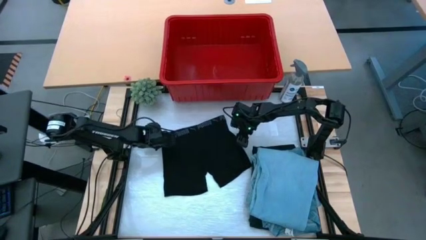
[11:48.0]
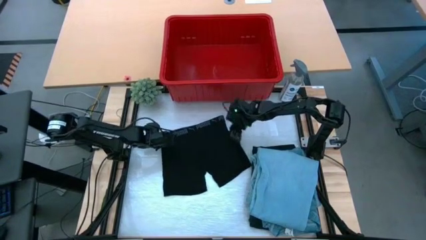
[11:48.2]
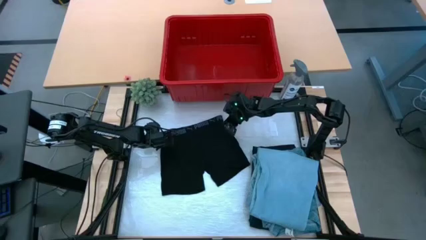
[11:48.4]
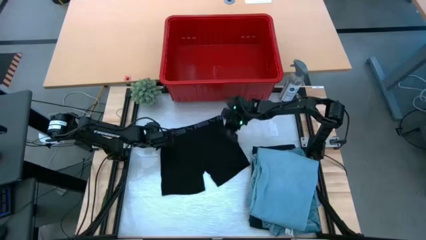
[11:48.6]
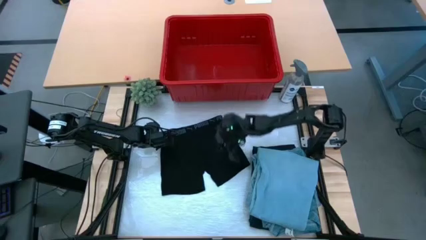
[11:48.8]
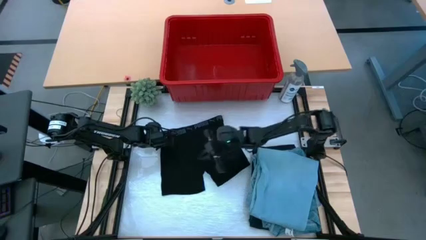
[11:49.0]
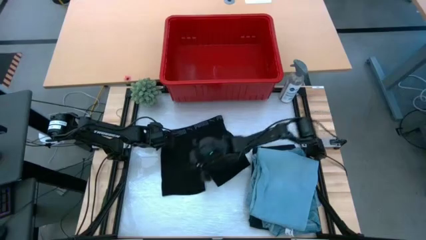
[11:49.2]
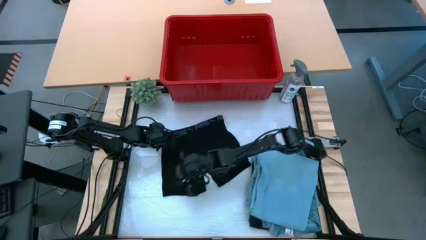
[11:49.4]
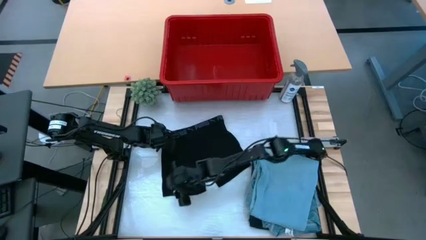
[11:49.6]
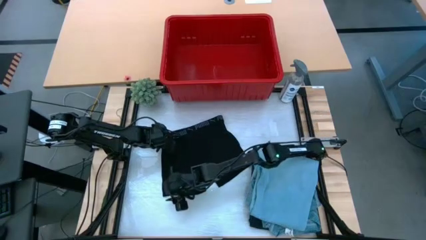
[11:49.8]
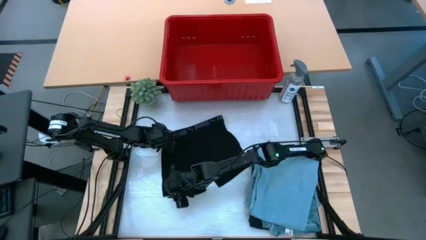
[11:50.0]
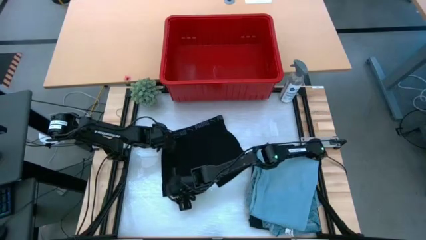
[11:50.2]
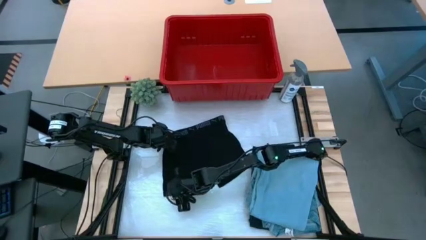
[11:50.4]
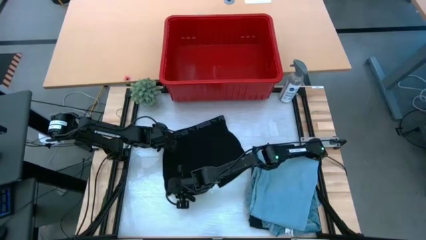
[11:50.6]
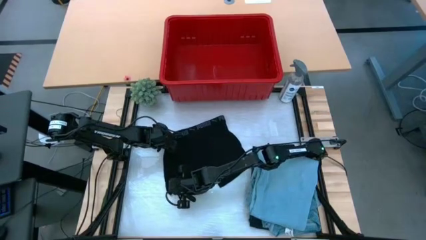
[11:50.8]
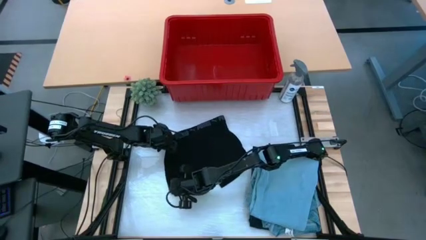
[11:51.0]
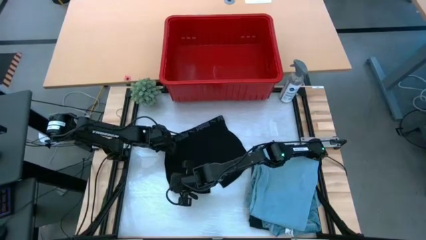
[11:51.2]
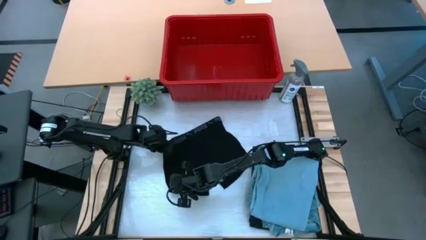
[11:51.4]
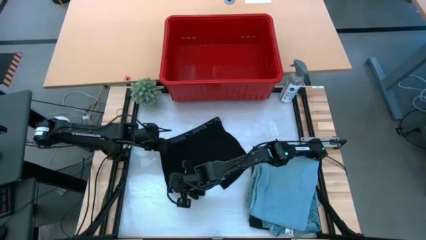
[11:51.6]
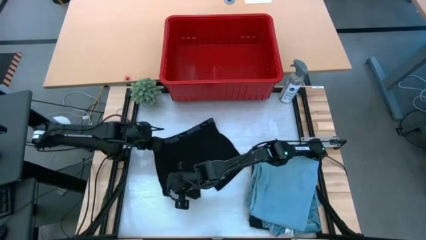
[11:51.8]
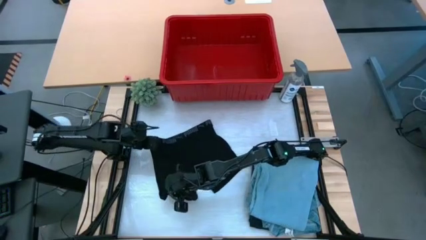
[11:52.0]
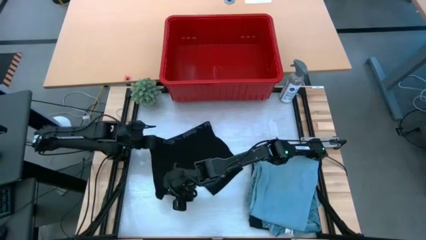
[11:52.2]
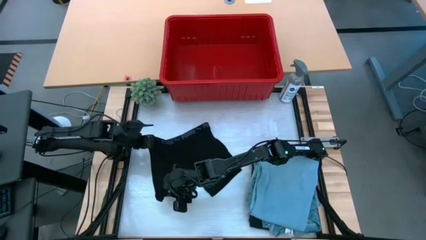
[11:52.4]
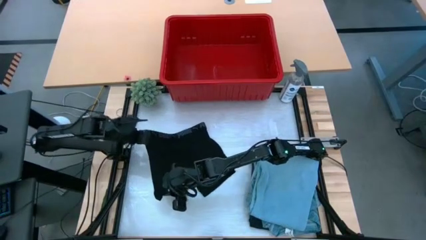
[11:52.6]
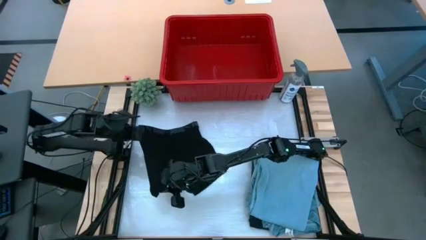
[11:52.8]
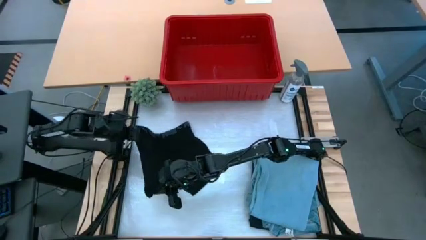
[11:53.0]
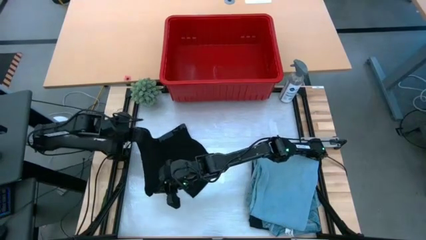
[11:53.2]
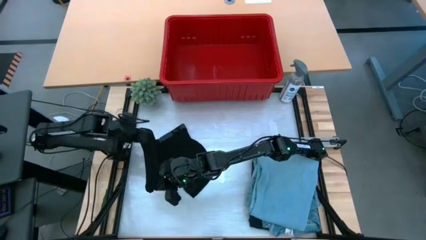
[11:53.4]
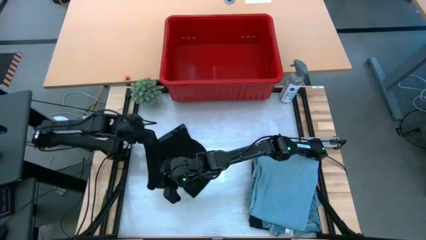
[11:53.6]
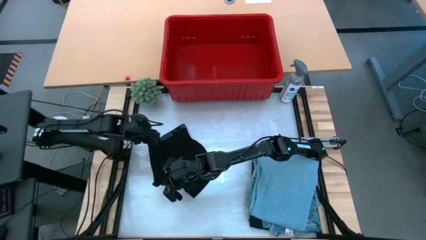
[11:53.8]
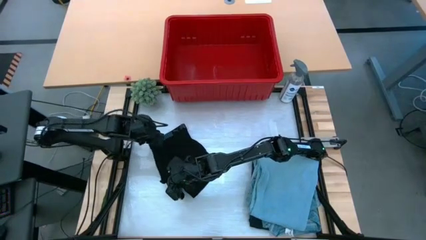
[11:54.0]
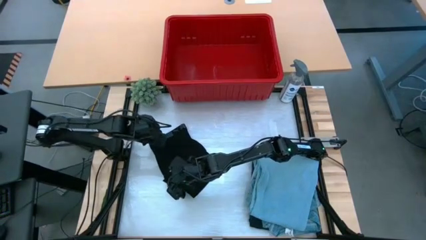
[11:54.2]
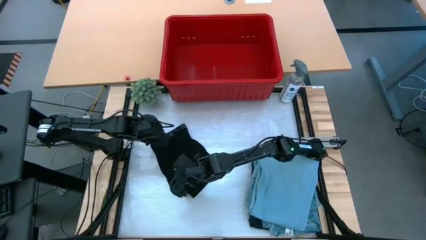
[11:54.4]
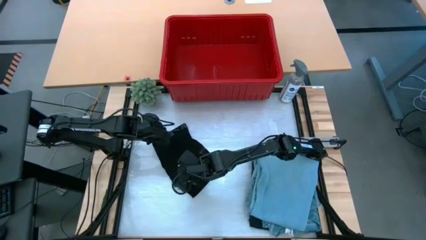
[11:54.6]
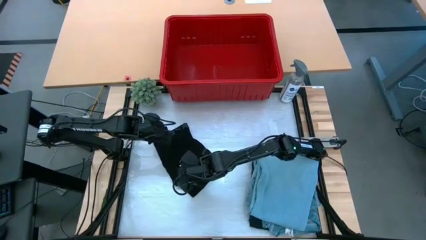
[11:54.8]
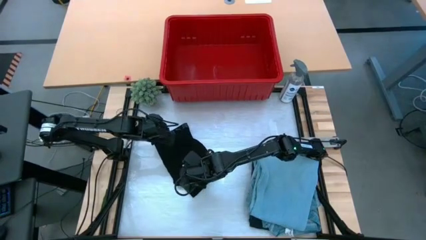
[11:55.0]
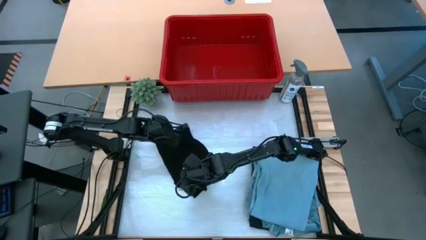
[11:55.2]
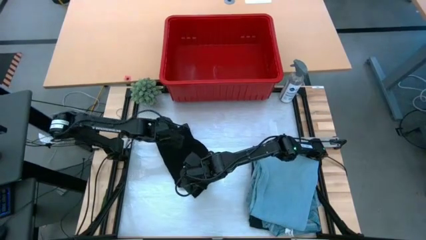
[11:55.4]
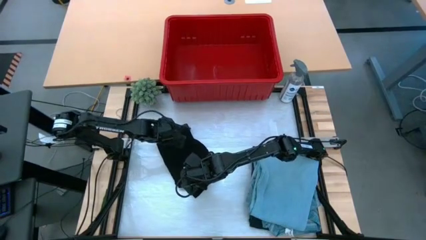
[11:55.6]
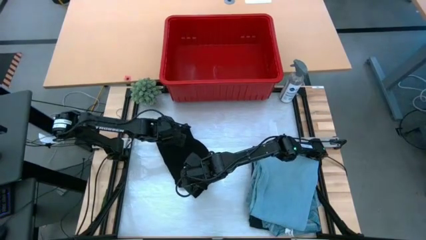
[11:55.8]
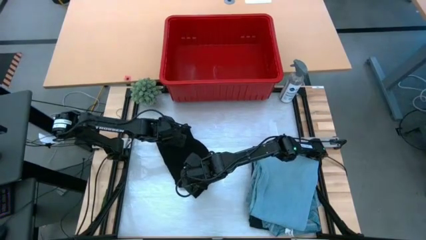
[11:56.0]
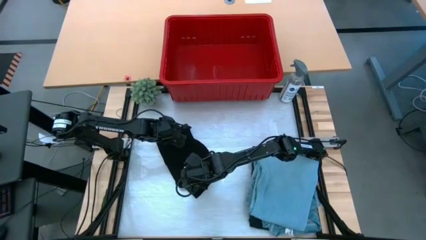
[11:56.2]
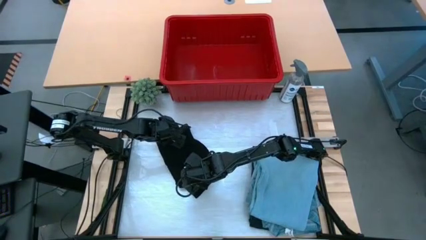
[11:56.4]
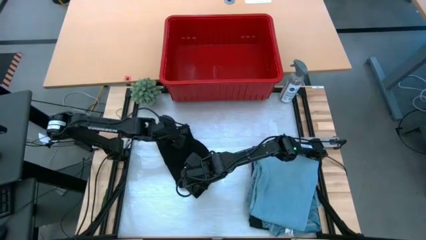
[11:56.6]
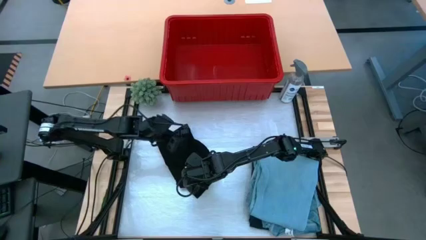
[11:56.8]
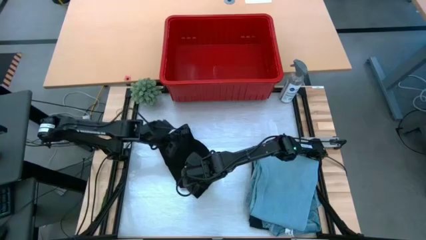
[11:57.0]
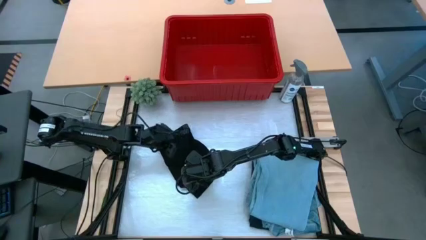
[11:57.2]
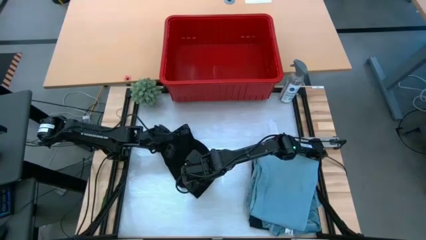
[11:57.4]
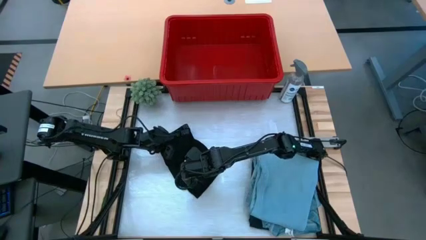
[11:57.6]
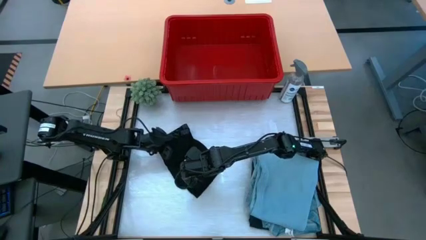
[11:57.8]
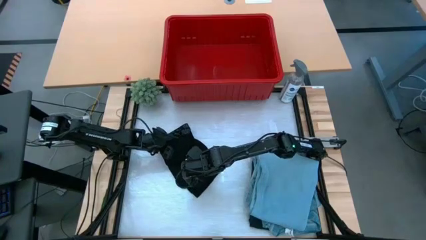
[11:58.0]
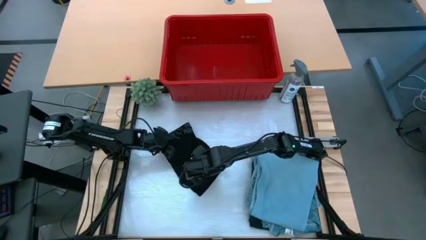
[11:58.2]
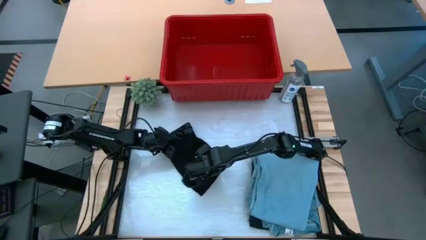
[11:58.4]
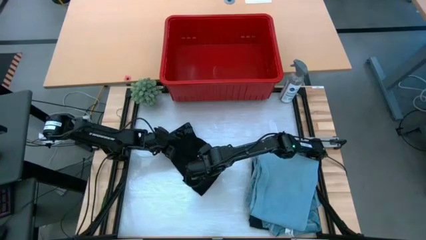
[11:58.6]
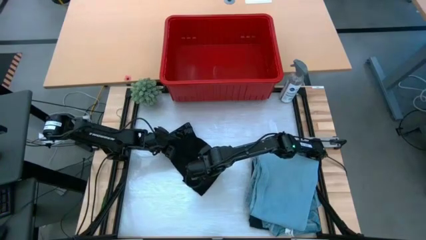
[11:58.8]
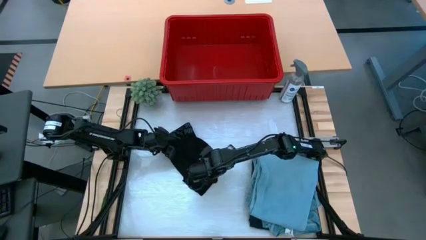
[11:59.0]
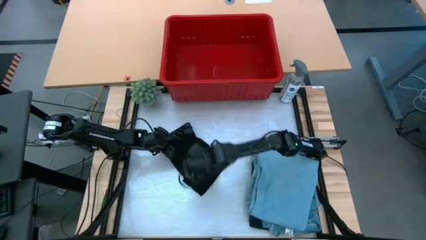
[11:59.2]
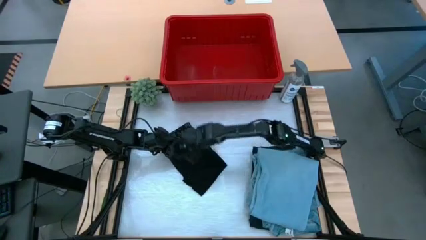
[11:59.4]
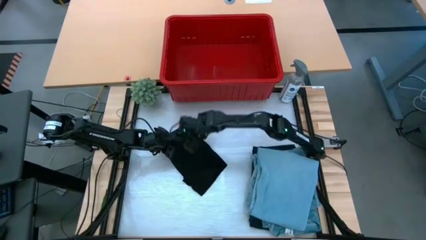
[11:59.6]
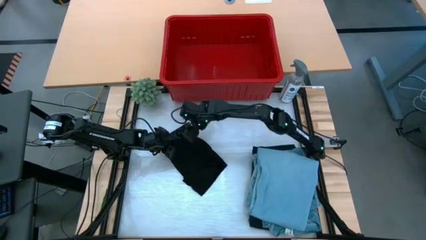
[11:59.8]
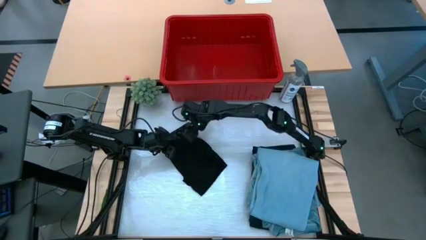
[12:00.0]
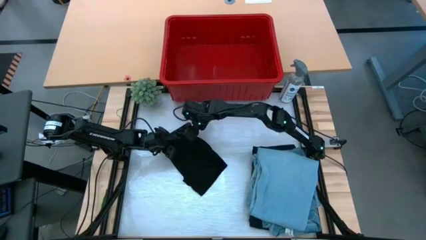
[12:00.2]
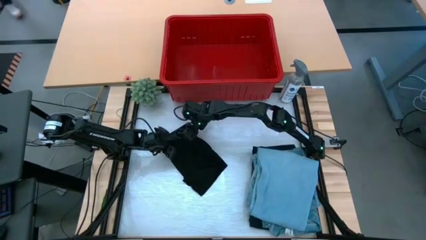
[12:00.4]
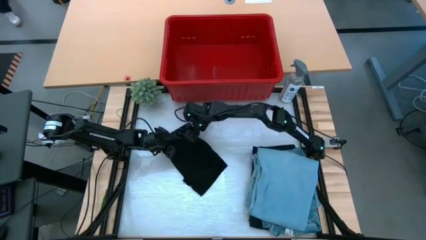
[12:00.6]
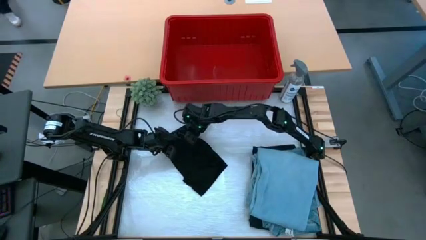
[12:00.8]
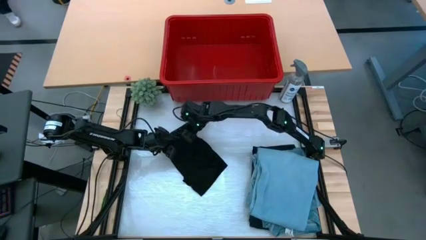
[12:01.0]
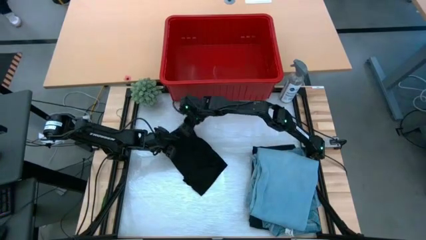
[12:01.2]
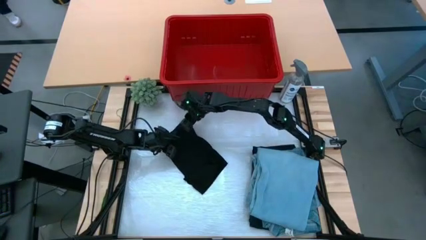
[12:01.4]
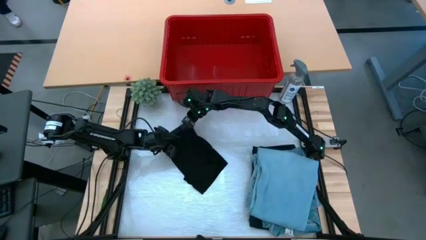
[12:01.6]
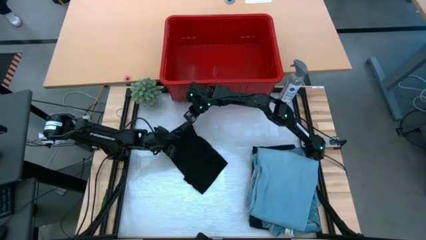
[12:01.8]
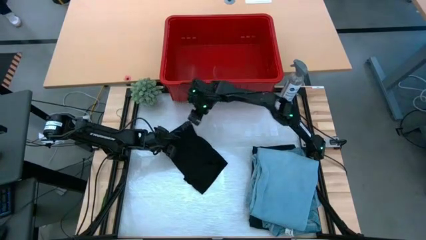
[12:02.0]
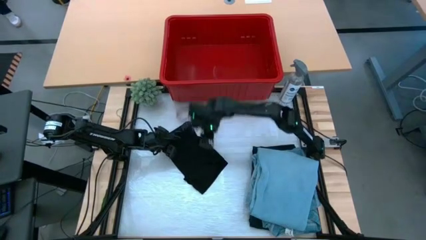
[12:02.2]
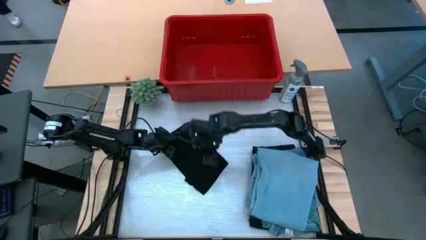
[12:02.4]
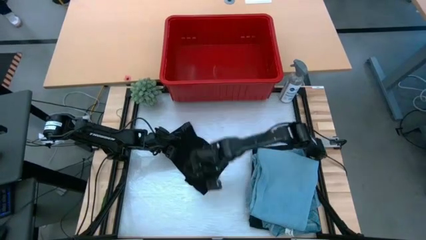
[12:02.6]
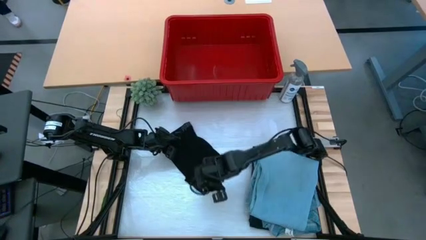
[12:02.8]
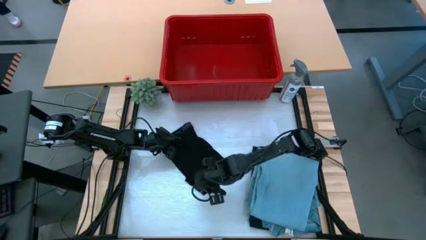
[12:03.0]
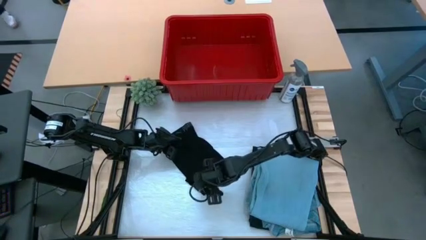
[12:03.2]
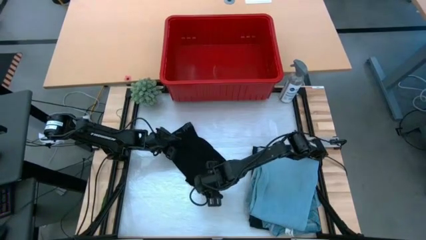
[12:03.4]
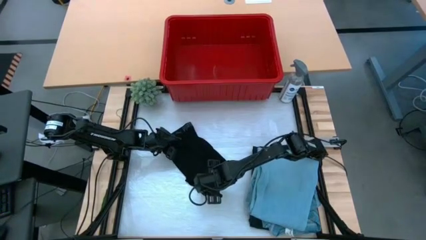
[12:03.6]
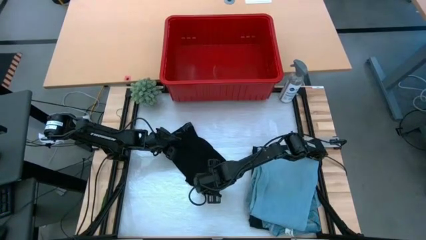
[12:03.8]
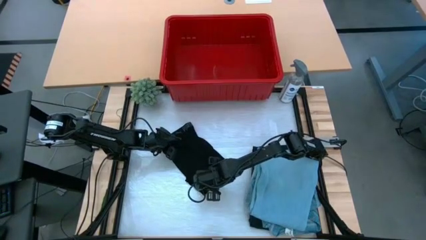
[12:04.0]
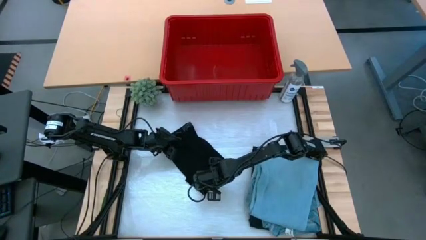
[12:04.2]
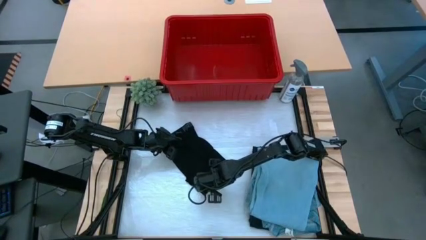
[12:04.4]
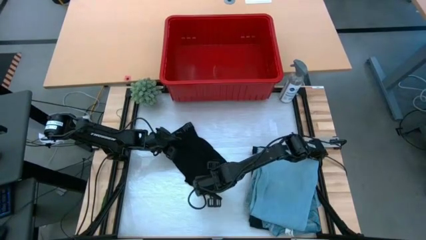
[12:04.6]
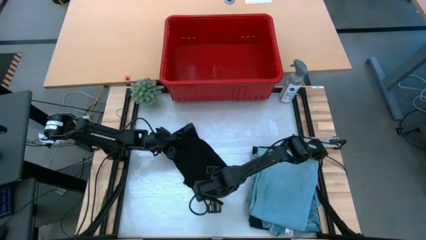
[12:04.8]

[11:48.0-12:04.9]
Task: Fold Laundry from Bin
Fold the black boxer
